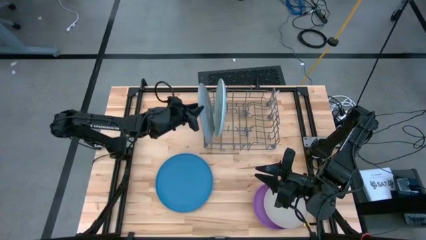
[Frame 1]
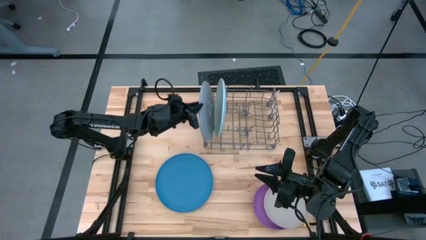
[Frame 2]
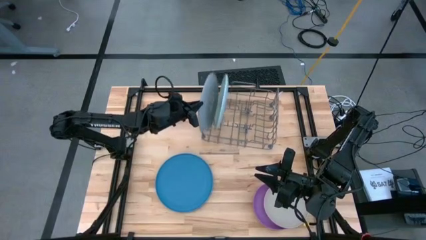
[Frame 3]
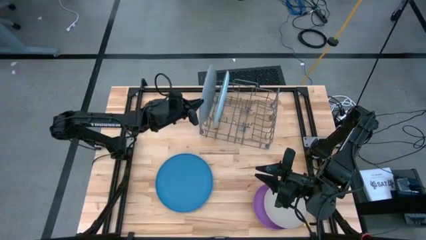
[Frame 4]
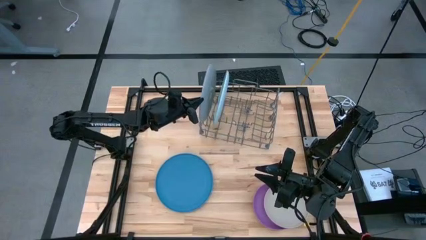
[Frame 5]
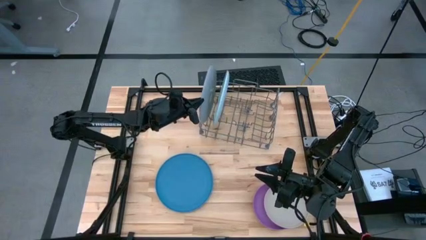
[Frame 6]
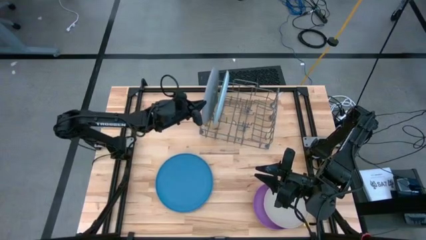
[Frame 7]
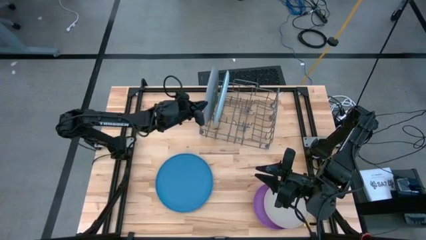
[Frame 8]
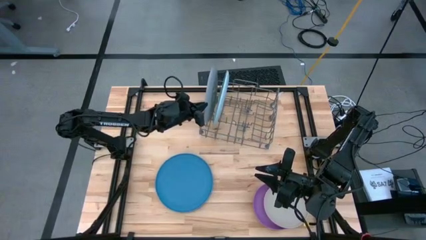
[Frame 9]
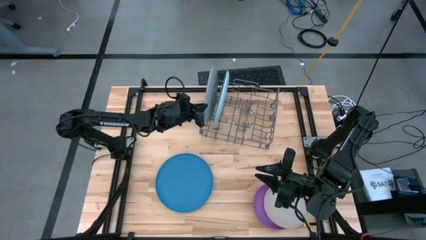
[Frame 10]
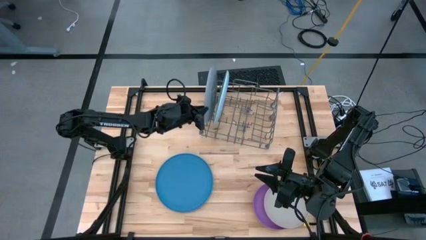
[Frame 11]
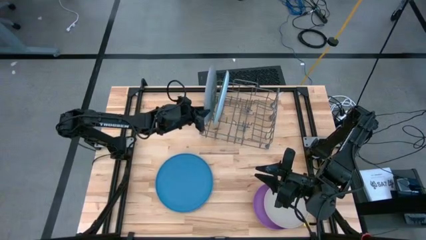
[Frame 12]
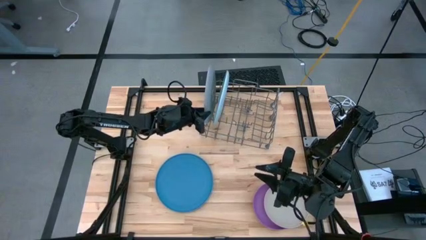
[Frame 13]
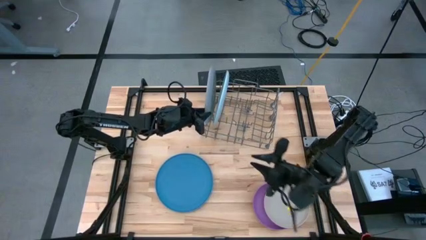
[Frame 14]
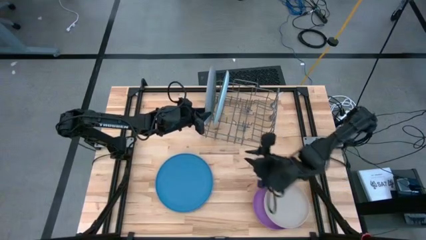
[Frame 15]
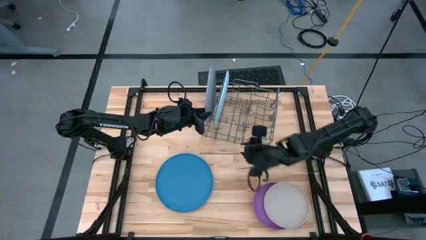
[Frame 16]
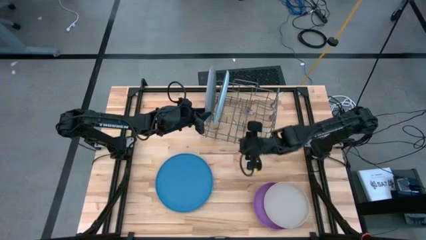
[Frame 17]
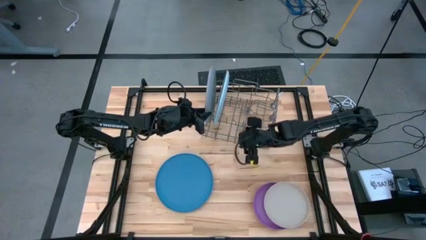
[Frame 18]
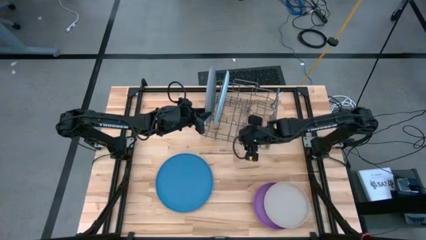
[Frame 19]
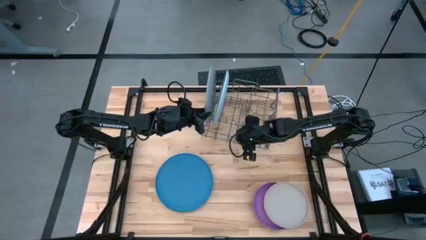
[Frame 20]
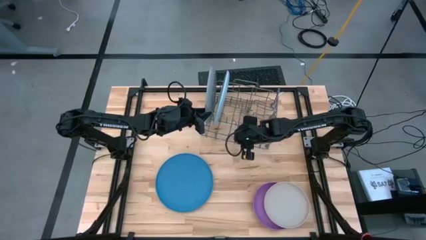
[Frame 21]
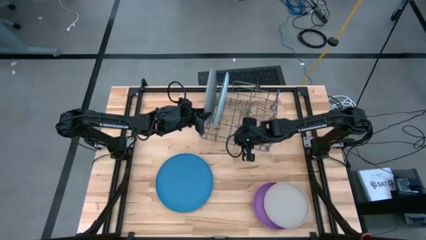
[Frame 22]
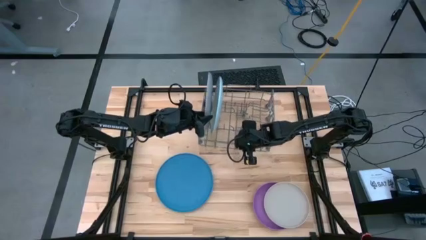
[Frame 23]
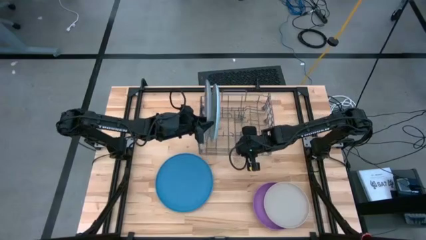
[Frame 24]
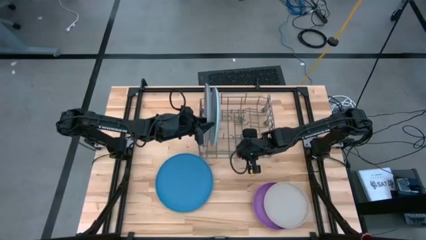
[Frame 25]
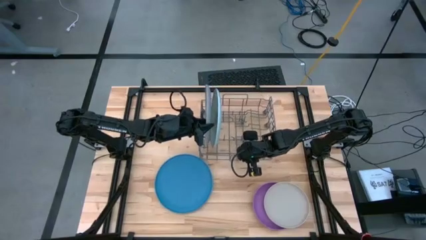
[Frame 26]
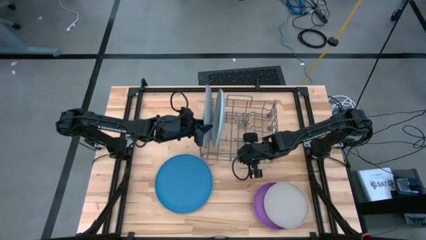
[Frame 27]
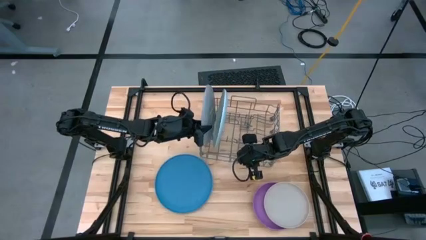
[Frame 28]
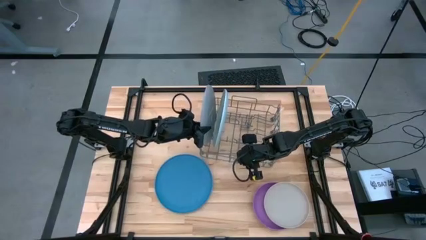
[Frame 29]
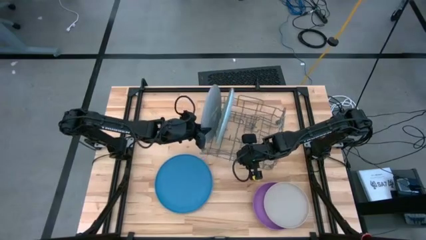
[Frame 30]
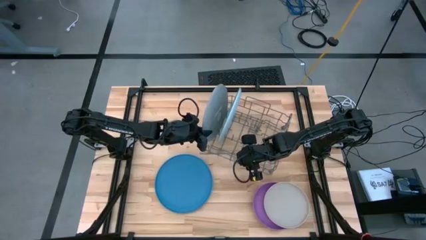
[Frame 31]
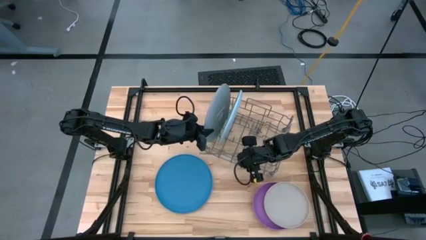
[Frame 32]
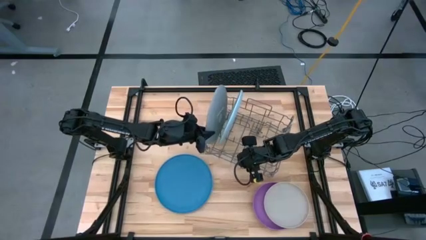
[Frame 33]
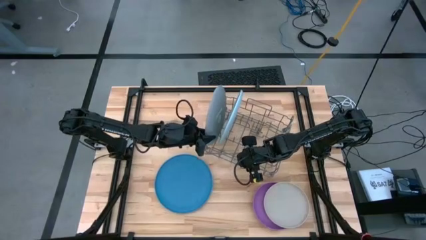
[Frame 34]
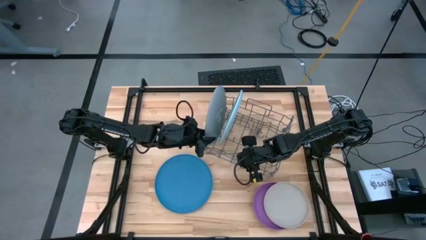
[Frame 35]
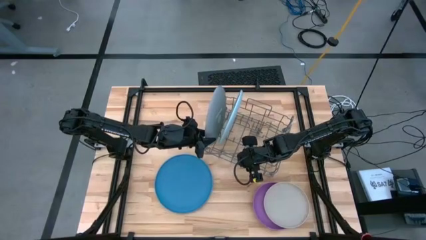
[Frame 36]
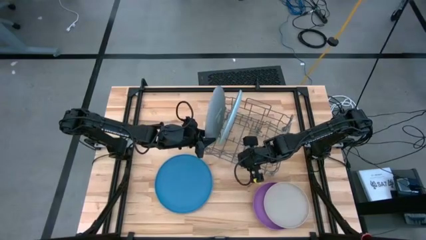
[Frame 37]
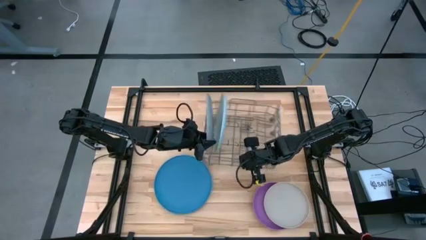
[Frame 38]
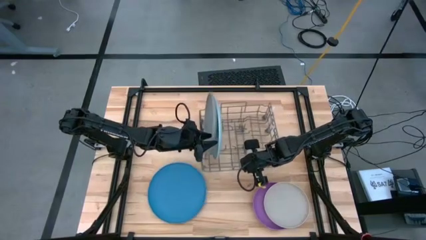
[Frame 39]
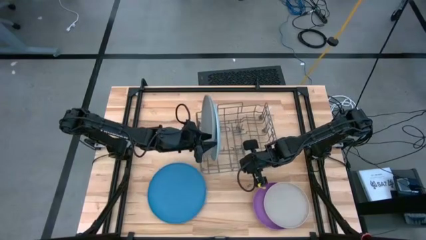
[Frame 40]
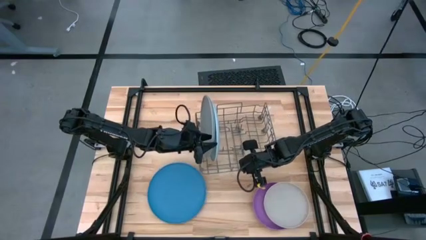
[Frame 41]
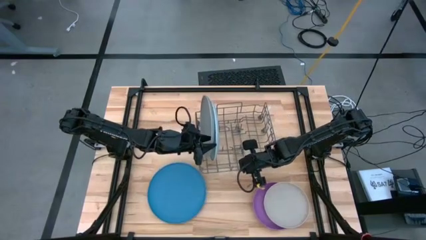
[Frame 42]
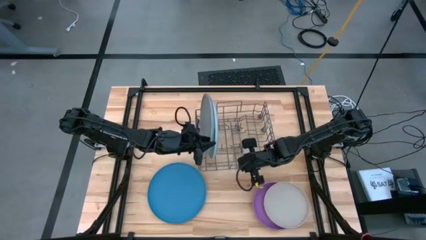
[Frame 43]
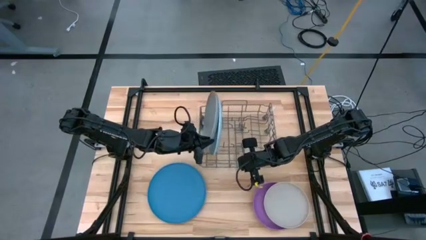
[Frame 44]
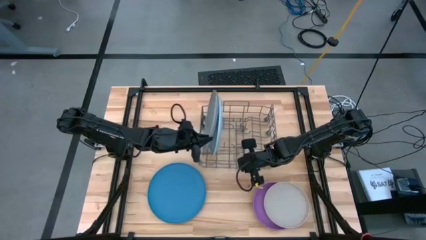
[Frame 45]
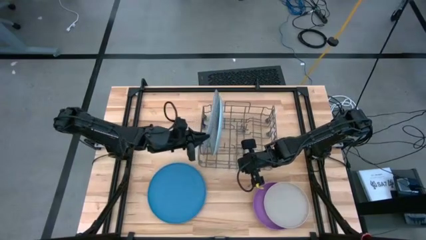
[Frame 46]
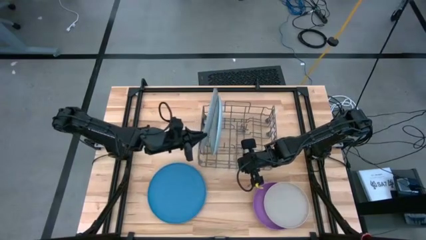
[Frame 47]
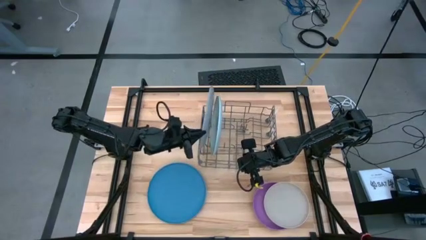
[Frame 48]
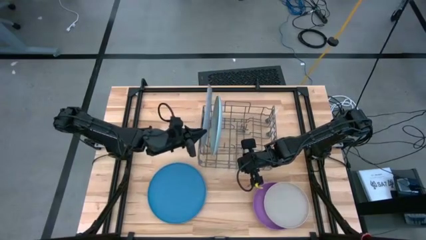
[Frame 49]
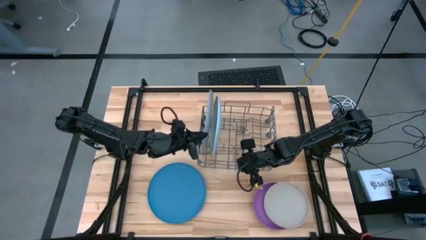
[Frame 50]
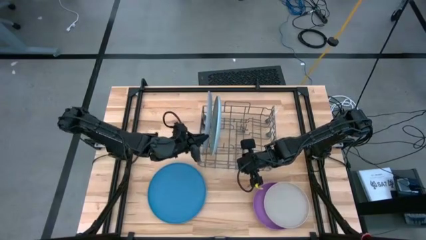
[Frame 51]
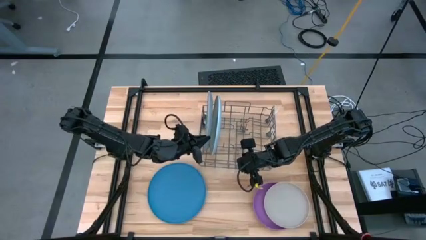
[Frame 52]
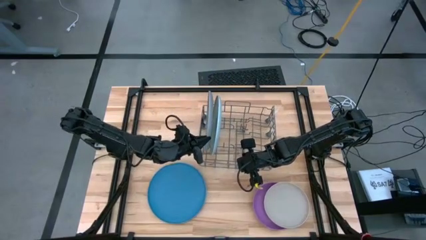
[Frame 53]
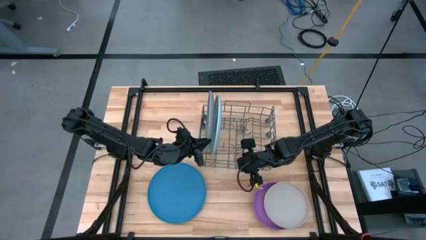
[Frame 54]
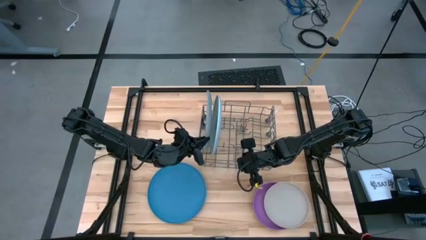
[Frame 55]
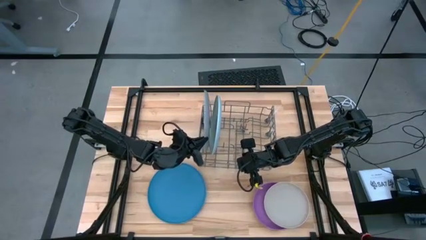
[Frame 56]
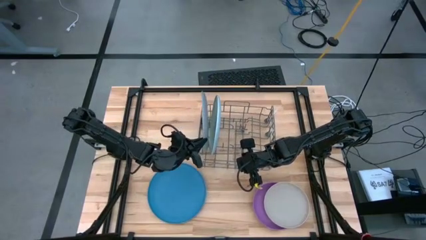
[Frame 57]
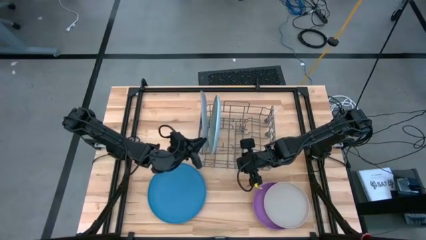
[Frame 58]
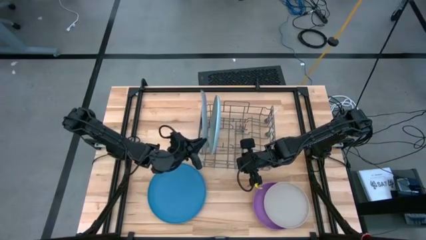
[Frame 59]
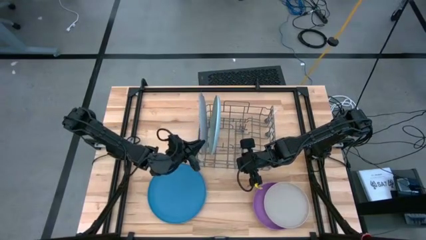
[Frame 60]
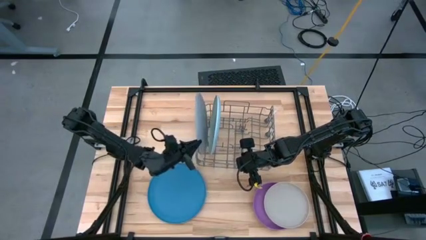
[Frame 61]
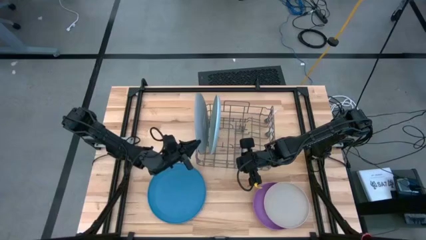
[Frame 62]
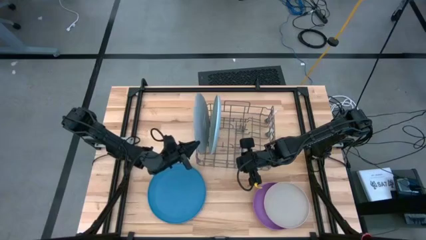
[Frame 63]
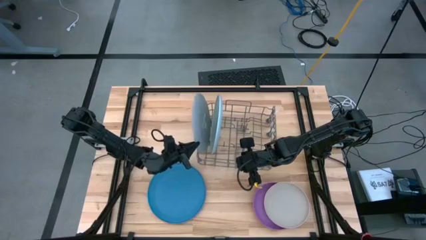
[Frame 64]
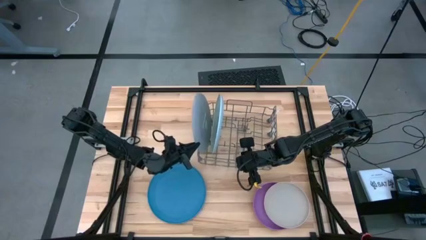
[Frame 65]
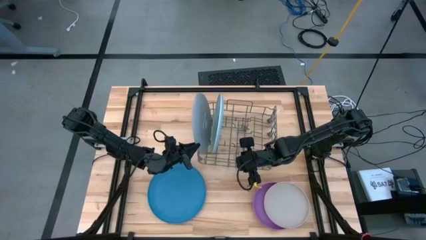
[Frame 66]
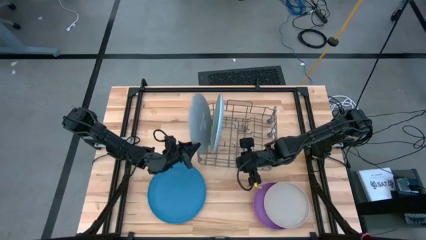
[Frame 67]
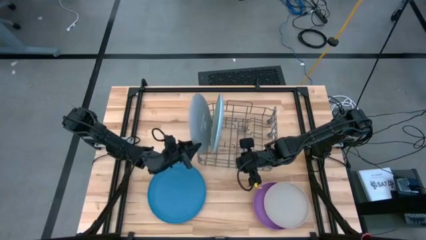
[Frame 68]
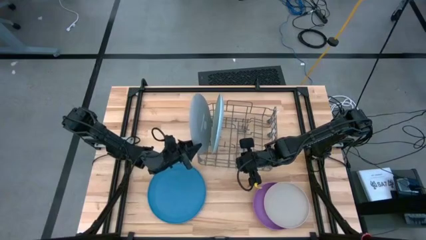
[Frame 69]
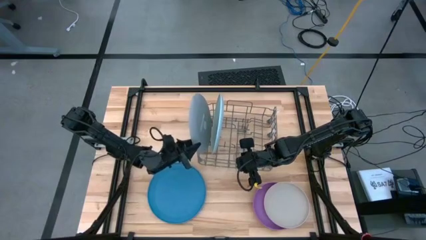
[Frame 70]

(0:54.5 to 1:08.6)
Task: Sort dishes
Put the gray plate into the dish rack
